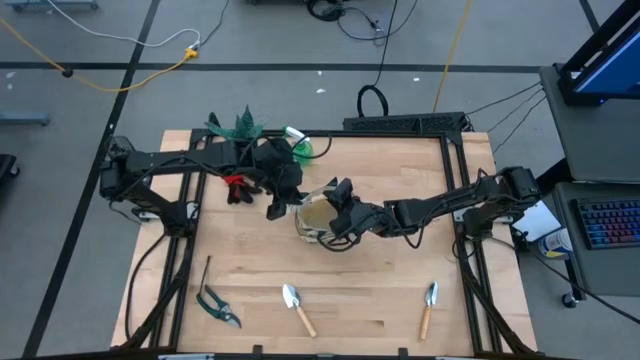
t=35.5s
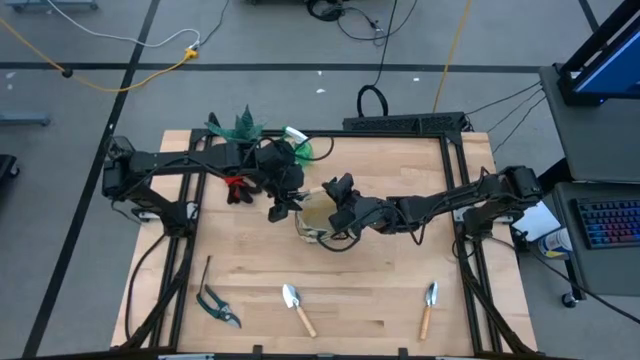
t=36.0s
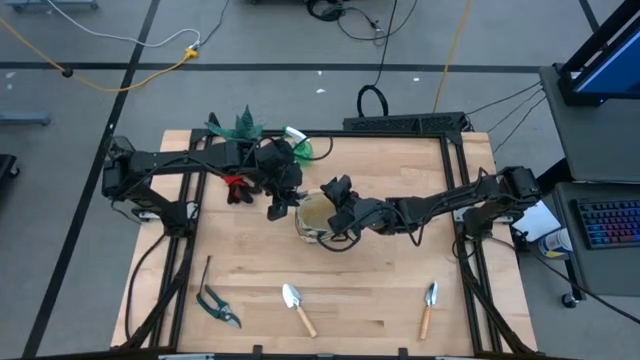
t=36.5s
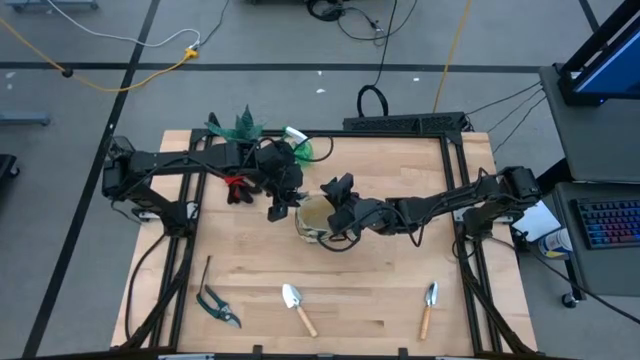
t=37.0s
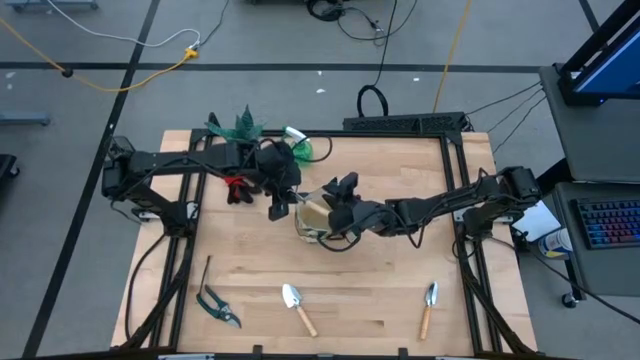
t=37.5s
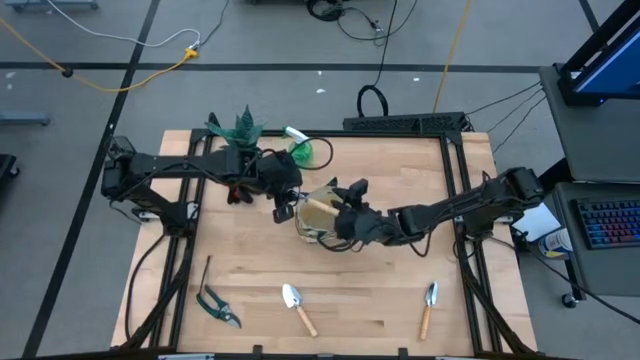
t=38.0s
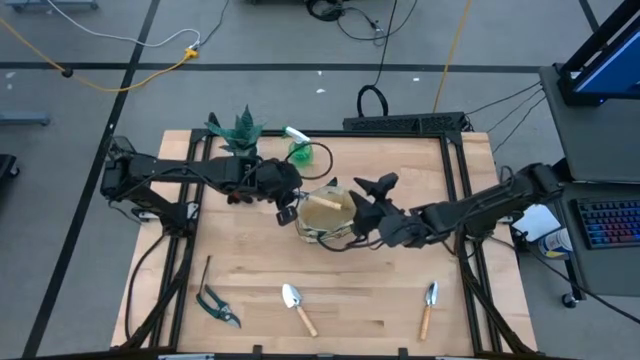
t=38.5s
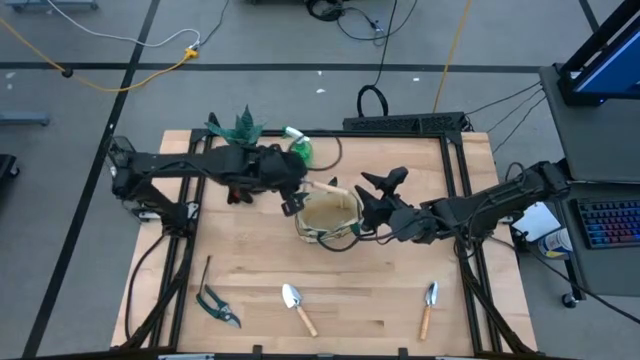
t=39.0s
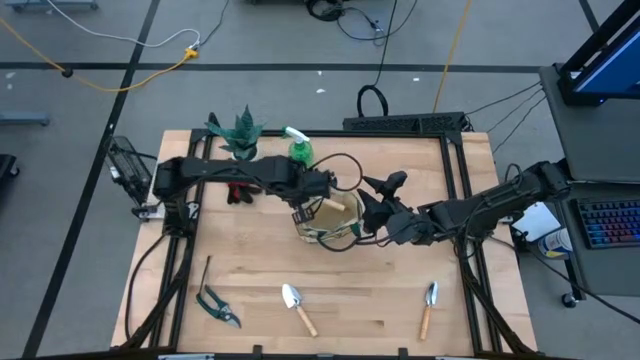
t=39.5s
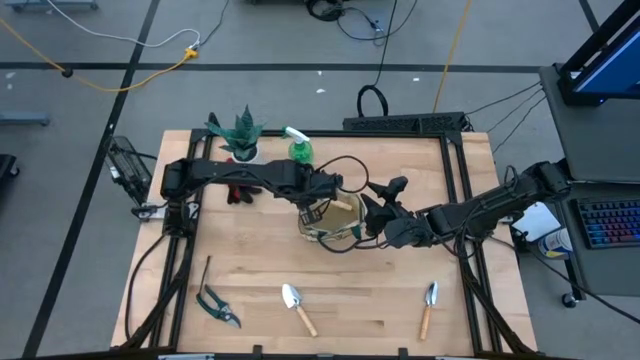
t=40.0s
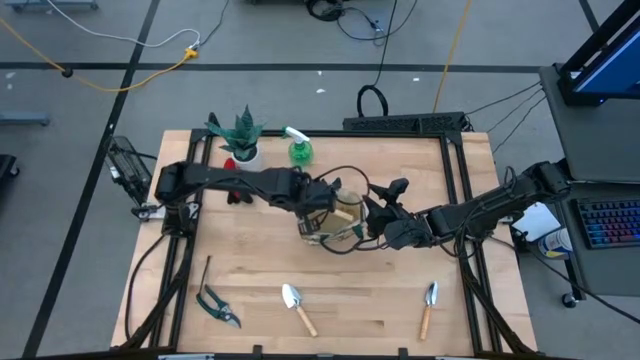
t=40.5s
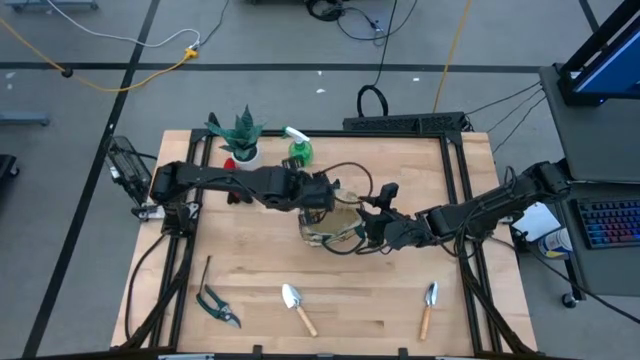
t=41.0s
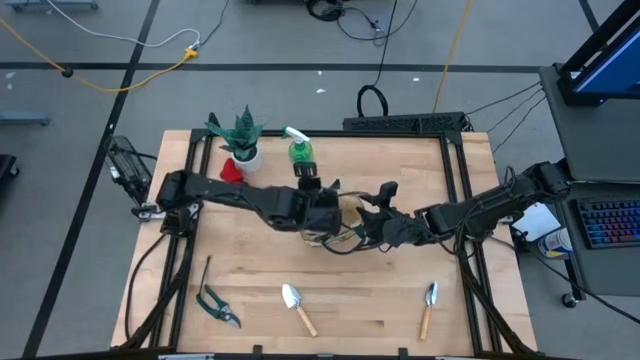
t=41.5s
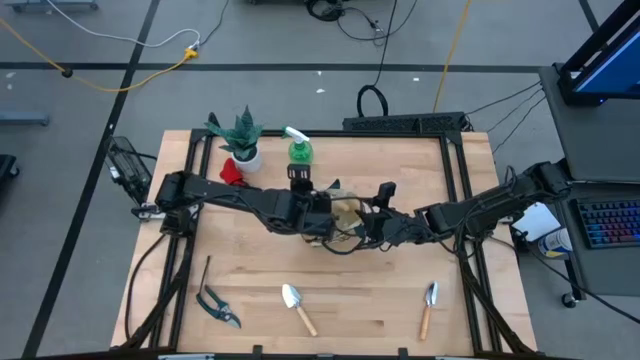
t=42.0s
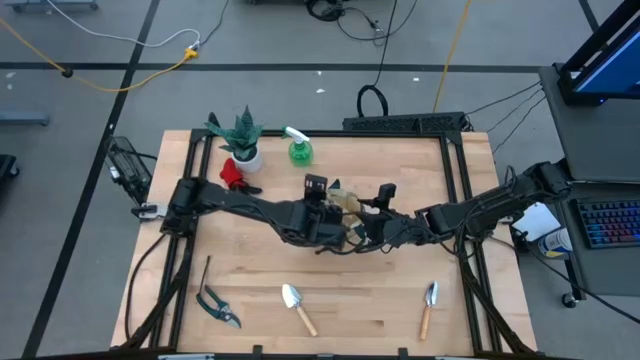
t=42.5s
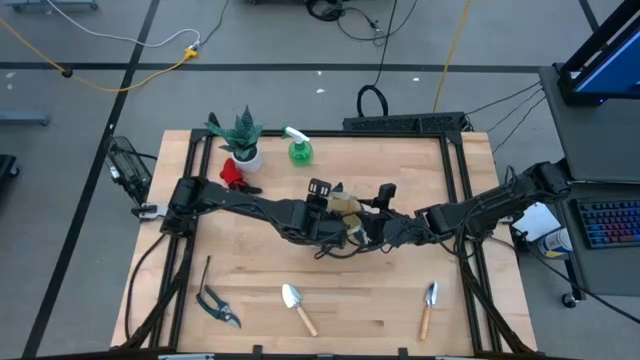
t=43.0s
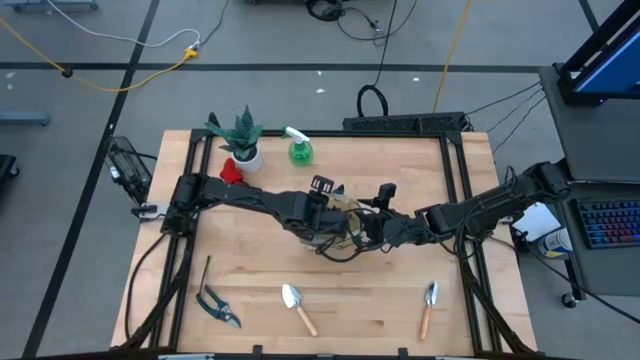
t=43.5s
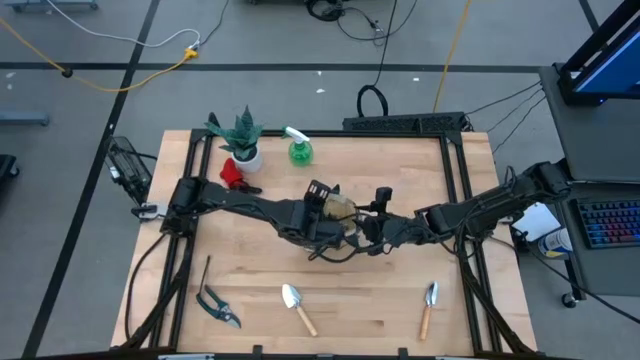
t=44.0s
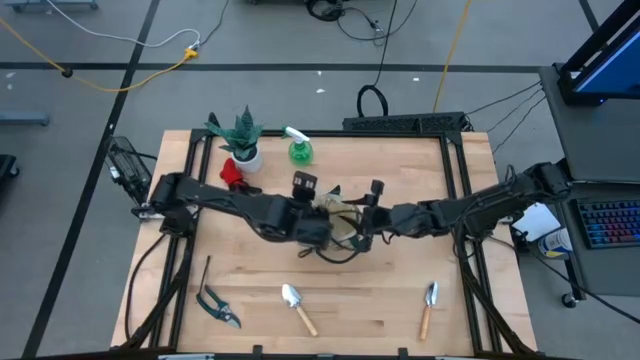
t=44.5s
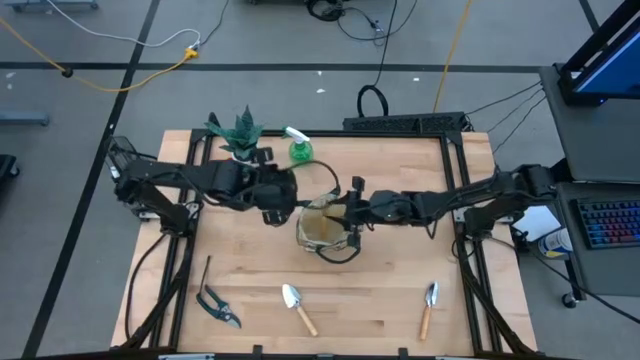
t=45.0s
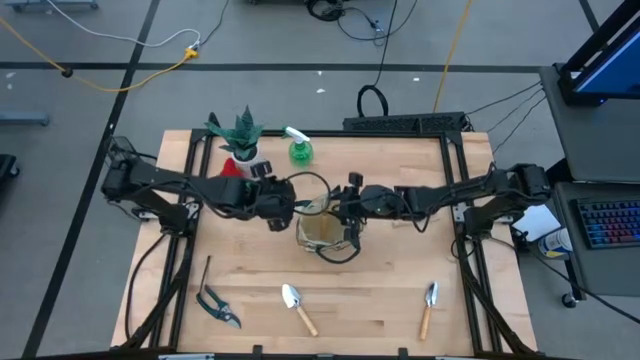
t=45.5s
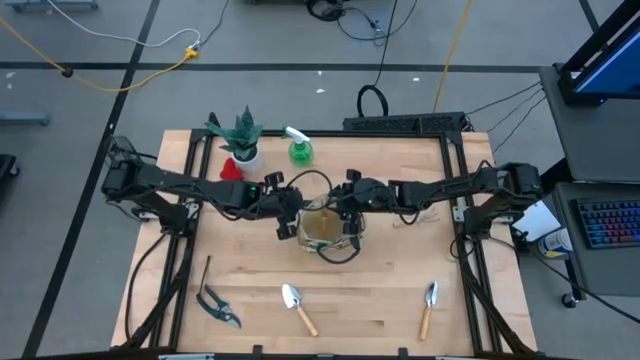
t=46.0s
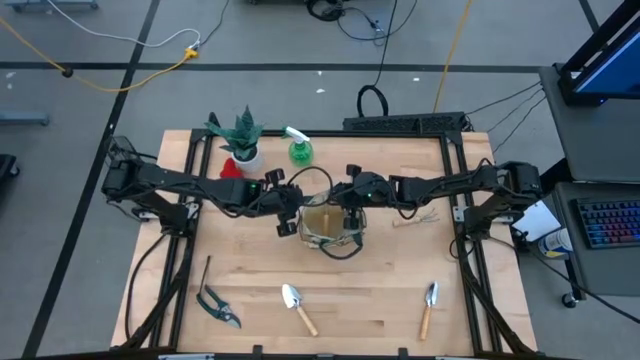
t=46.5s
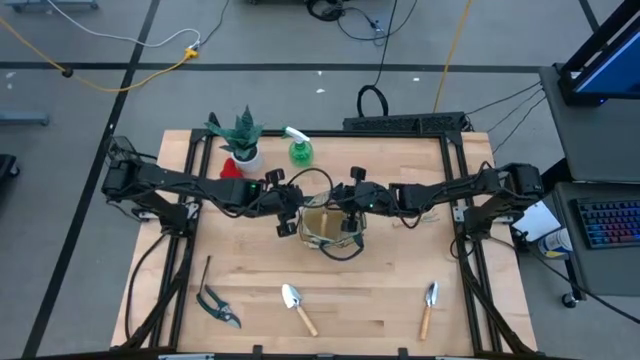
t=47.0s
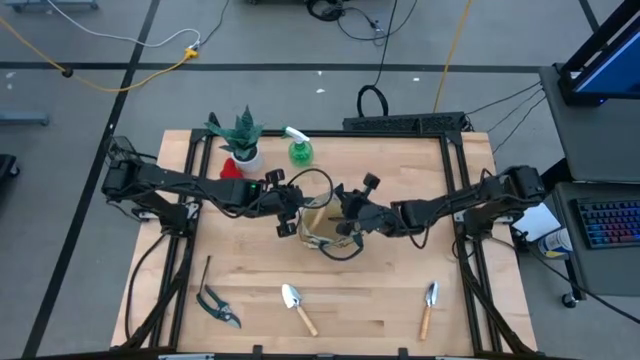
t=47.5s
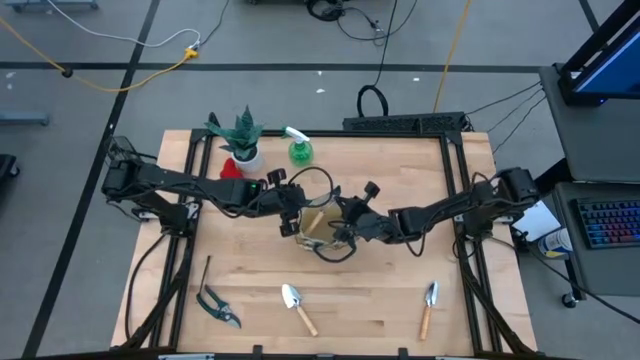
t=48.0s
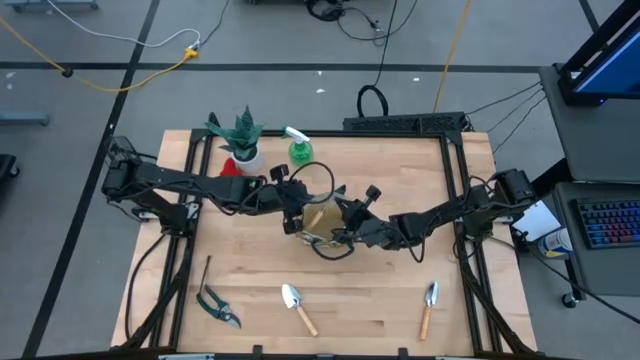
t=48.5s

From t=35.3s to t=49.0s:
Task: Pick & Place Garden tools in Gardening bag
Put the light brown hand rake into the gardening bag

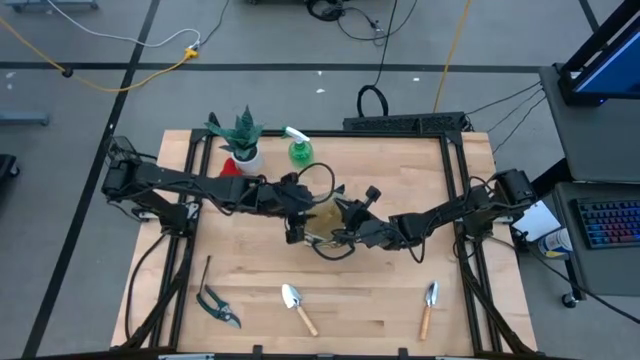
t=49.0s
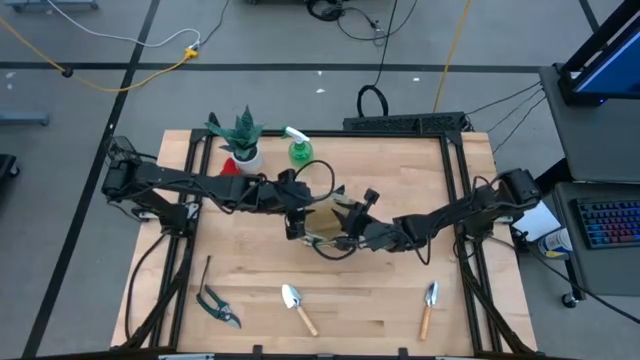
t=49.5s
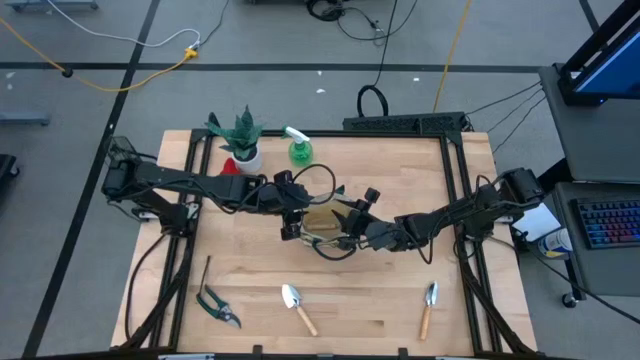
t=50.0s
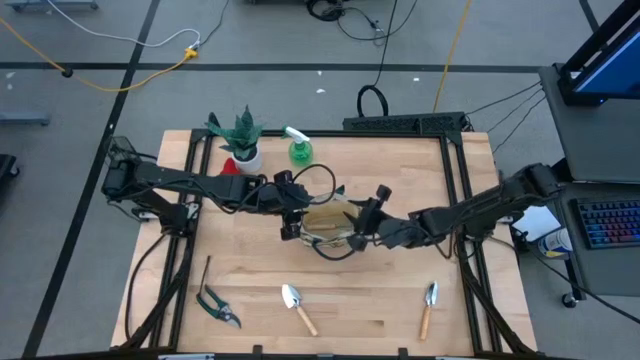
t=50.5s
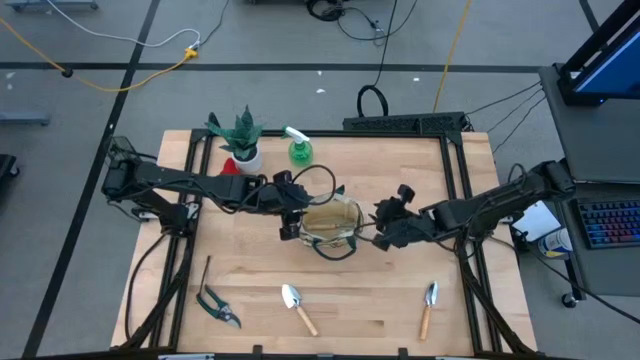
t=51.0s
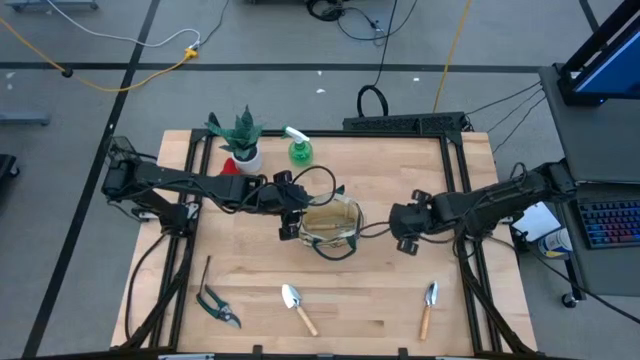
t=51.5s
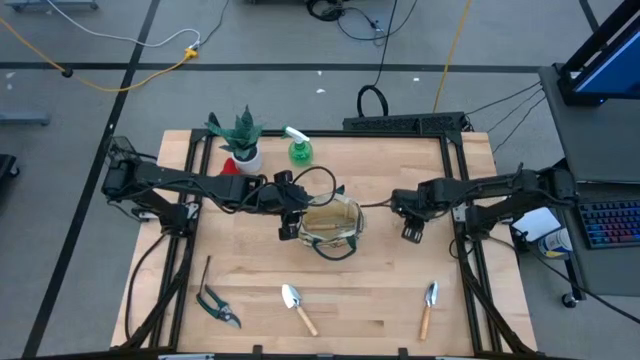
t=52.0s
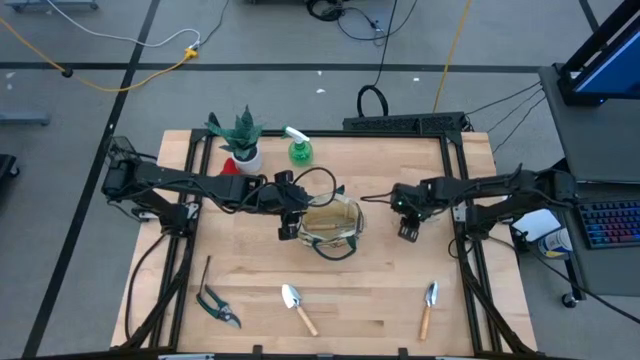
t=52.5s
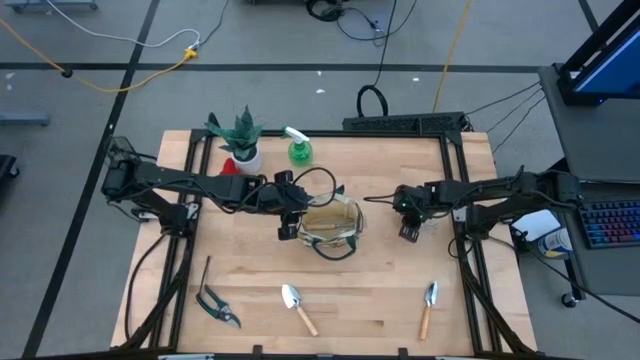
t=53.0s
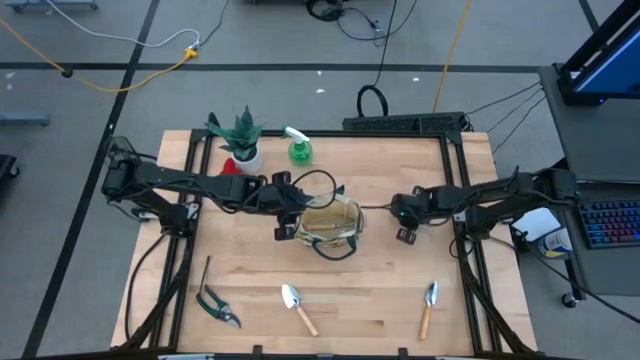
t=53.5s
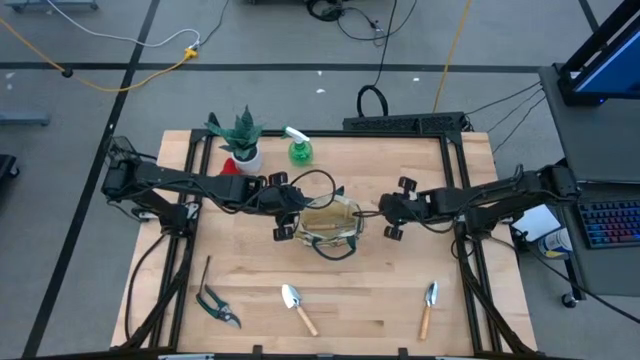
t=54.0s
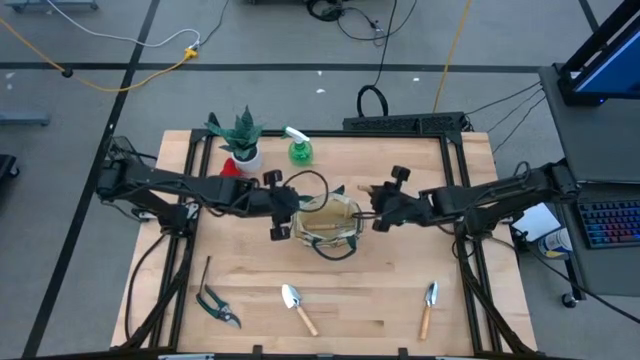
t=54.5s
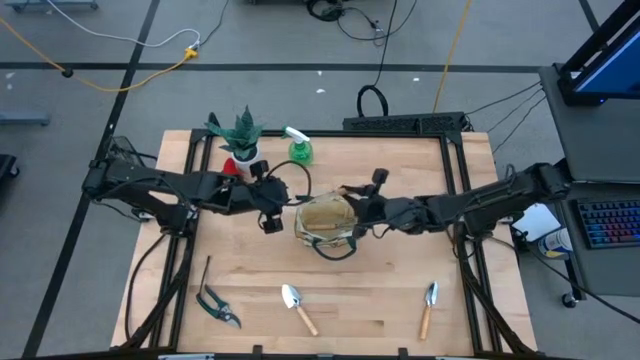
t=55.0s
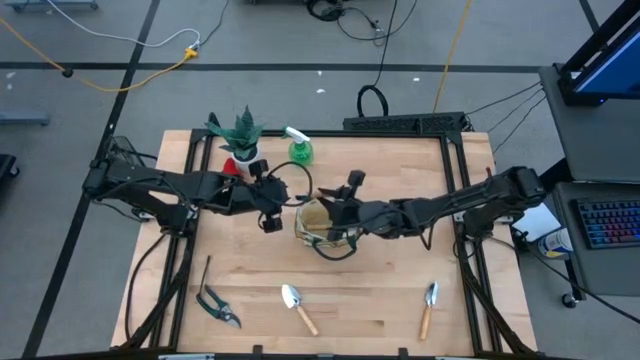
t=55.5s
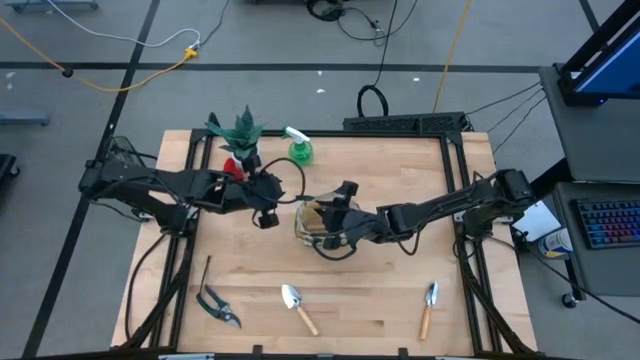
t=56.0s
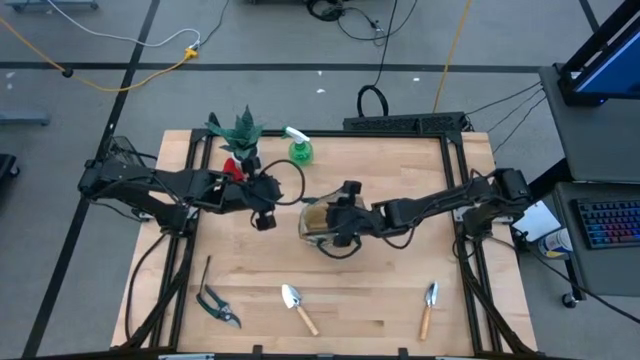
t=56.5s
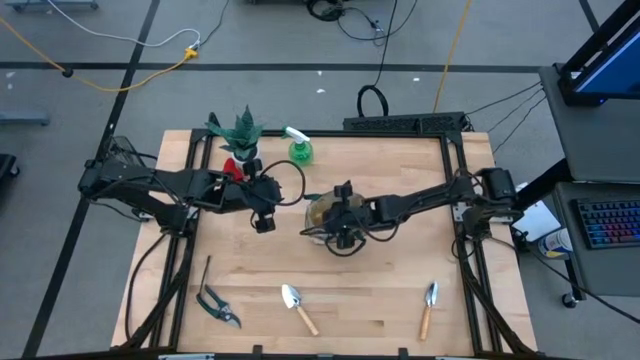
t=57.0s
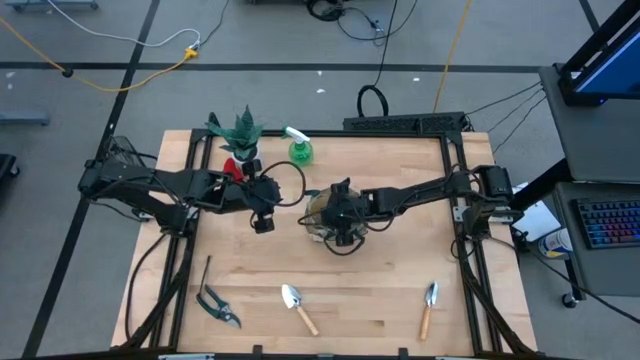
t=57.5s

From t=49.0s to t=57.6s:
Put the light brown hand rake into the gardening bag
